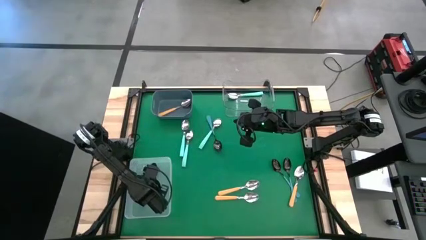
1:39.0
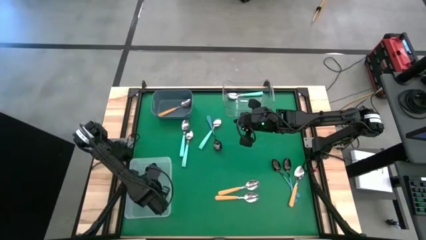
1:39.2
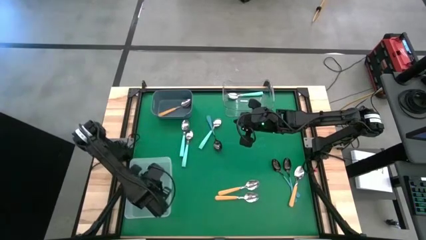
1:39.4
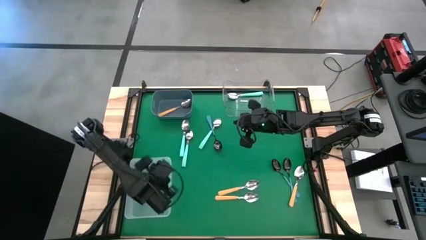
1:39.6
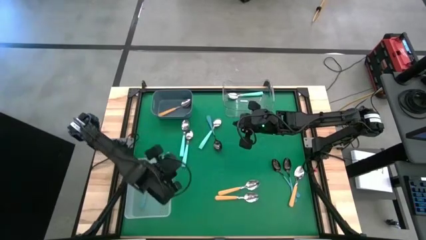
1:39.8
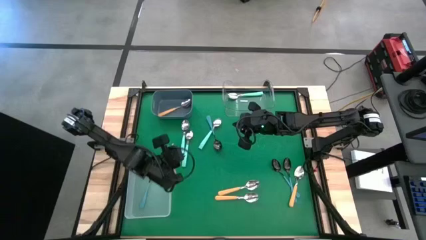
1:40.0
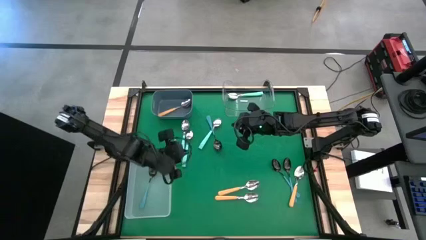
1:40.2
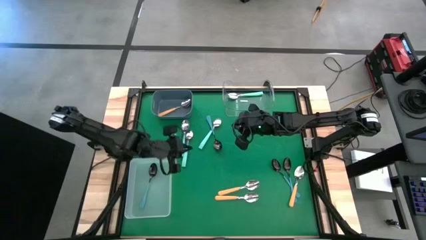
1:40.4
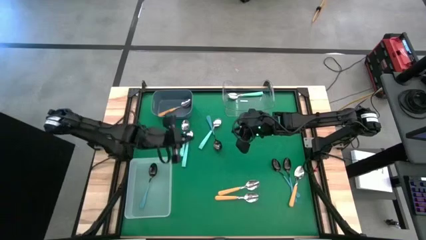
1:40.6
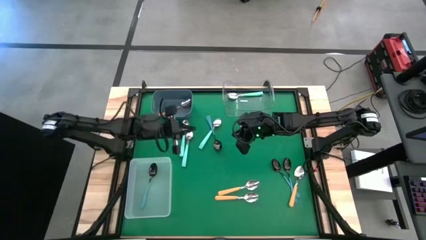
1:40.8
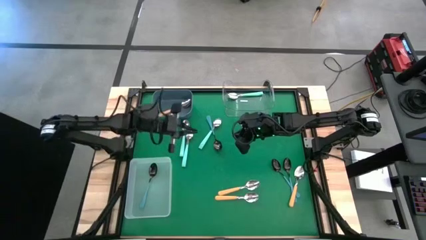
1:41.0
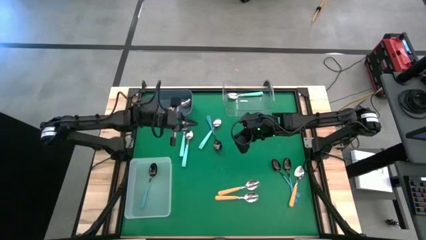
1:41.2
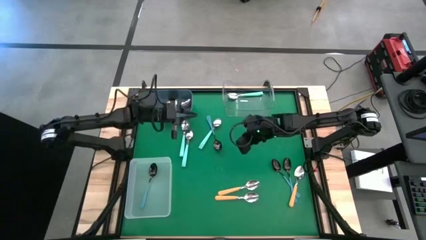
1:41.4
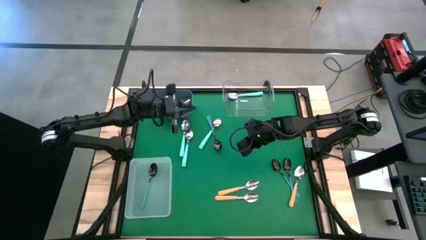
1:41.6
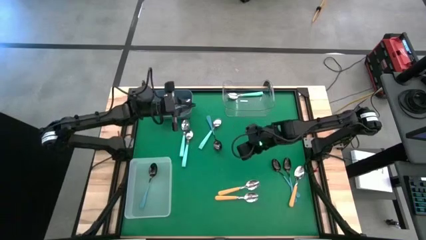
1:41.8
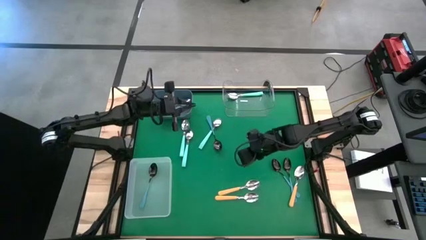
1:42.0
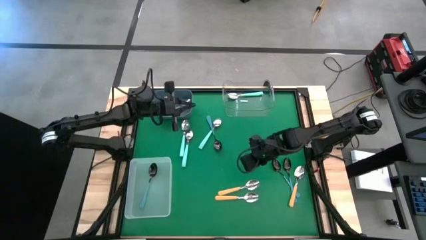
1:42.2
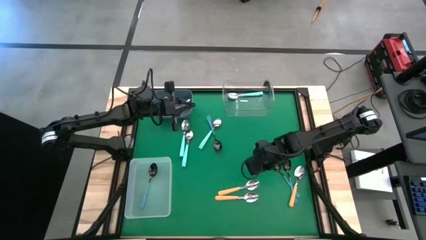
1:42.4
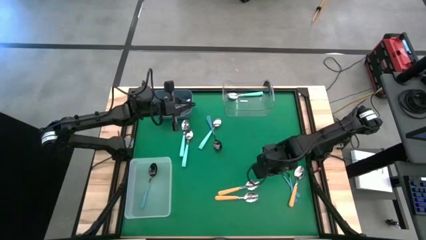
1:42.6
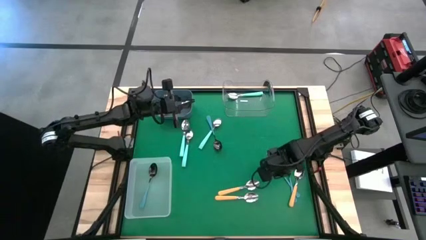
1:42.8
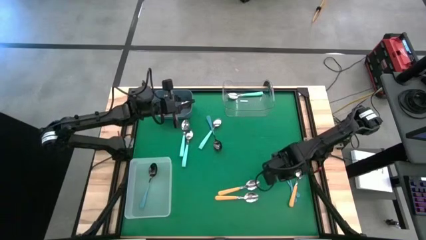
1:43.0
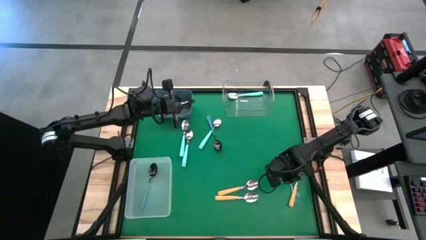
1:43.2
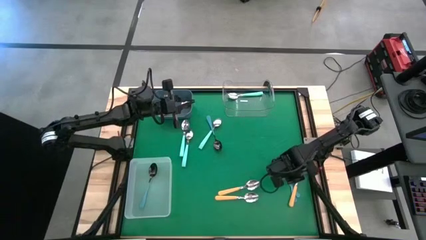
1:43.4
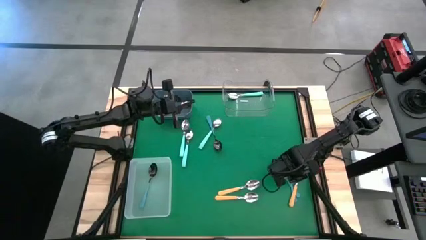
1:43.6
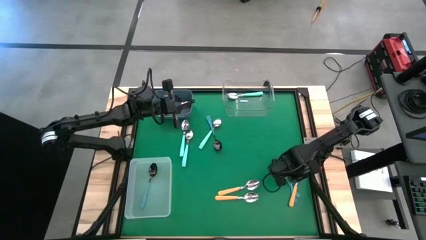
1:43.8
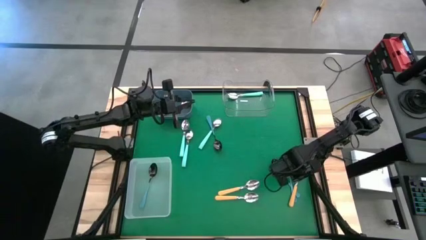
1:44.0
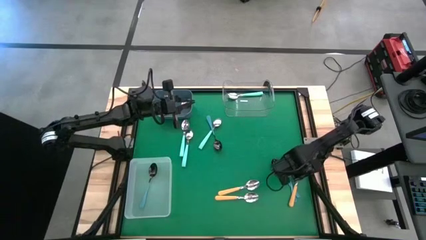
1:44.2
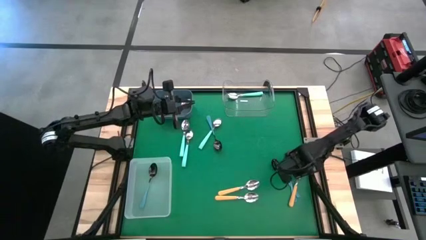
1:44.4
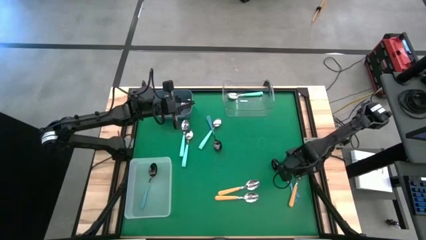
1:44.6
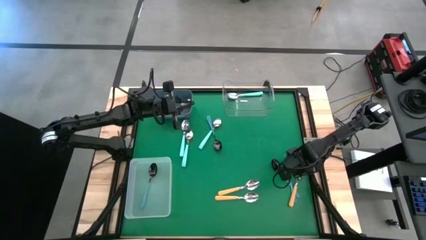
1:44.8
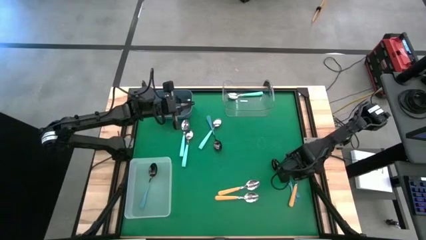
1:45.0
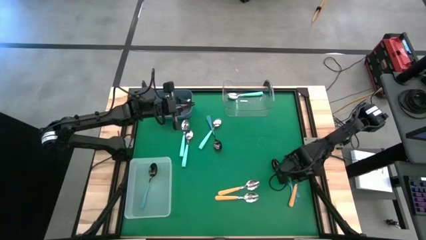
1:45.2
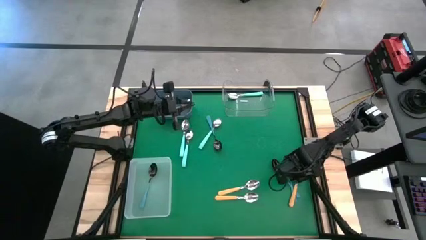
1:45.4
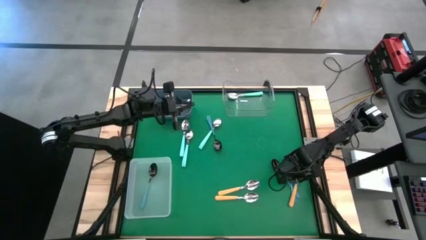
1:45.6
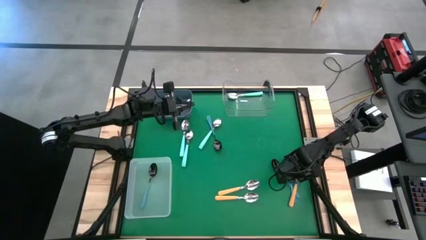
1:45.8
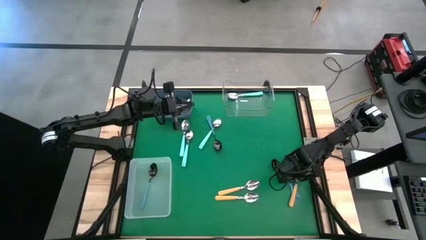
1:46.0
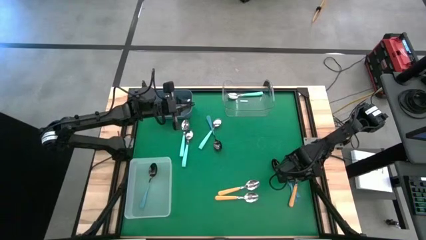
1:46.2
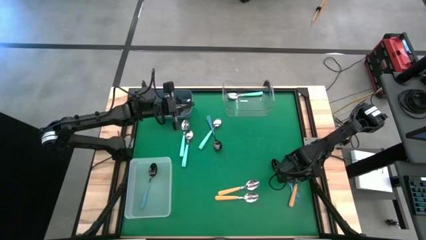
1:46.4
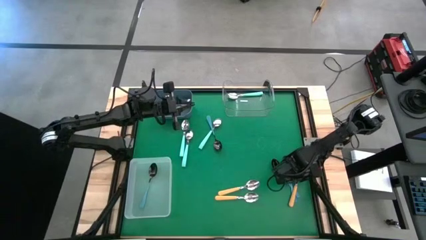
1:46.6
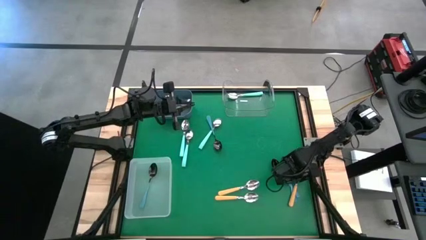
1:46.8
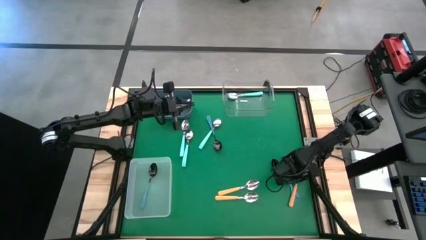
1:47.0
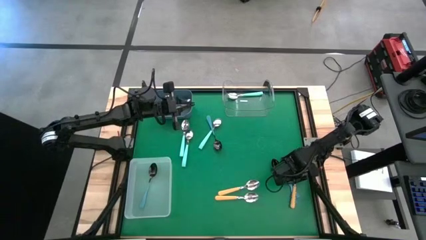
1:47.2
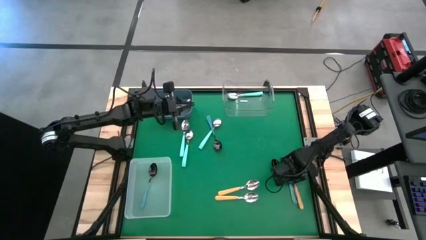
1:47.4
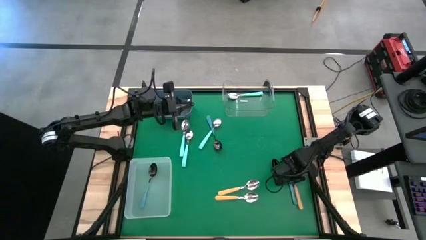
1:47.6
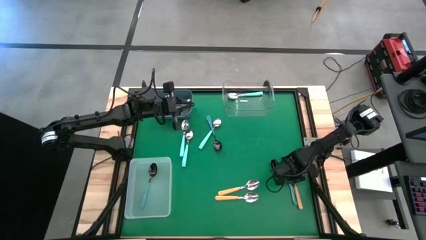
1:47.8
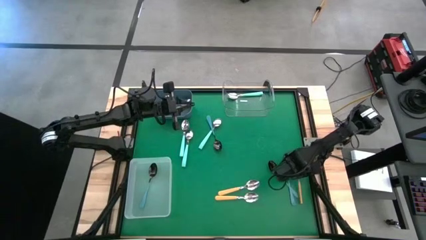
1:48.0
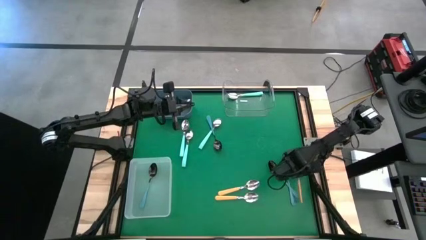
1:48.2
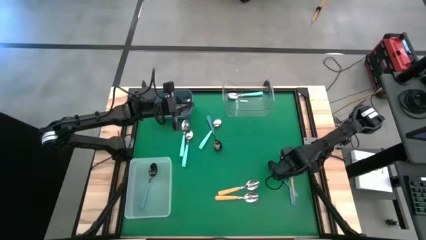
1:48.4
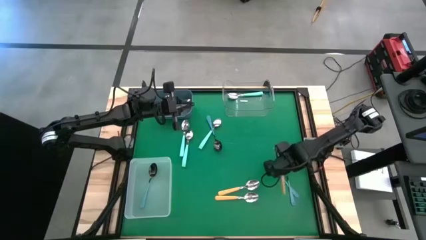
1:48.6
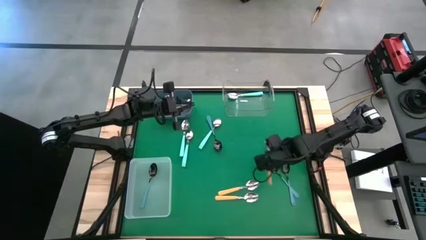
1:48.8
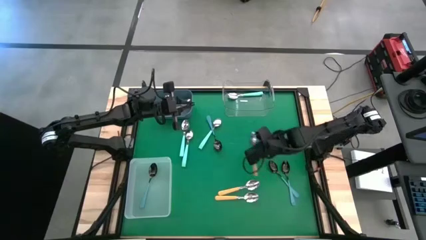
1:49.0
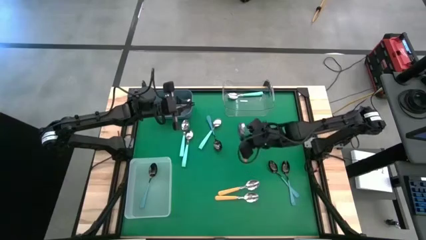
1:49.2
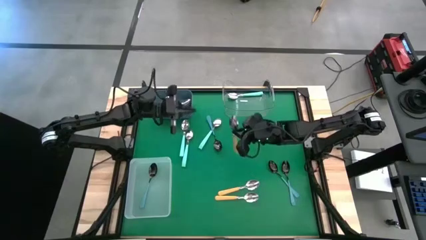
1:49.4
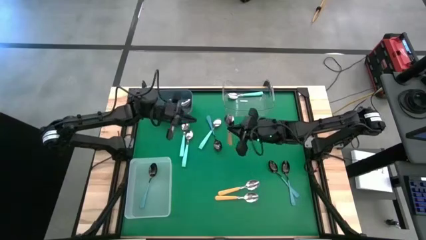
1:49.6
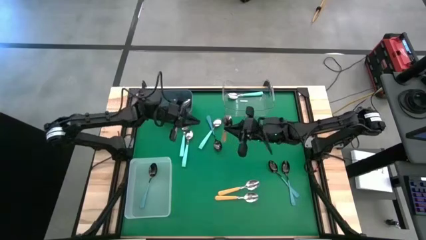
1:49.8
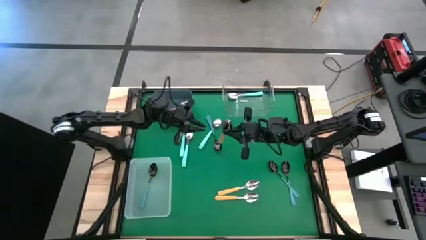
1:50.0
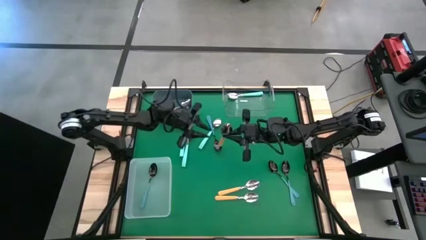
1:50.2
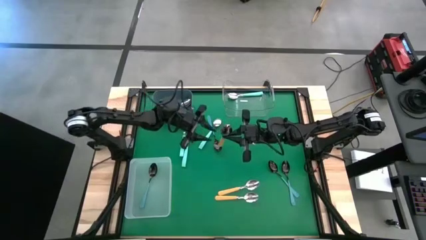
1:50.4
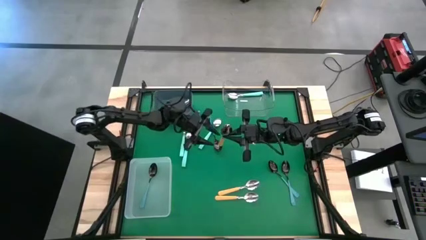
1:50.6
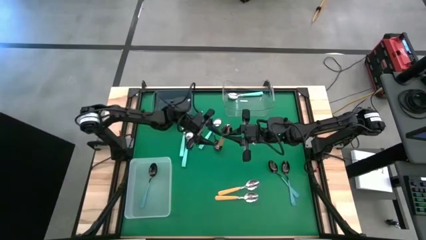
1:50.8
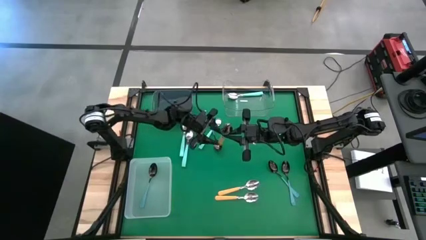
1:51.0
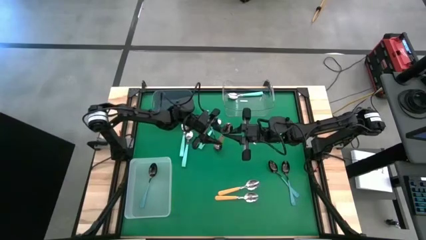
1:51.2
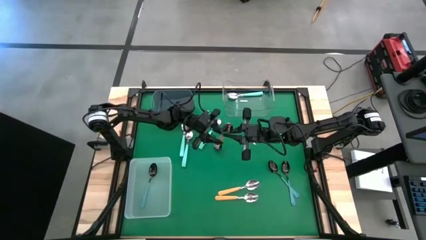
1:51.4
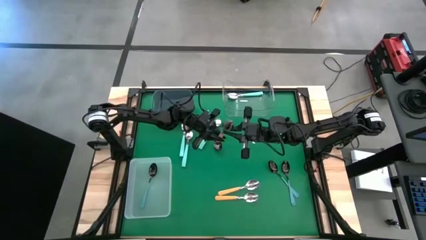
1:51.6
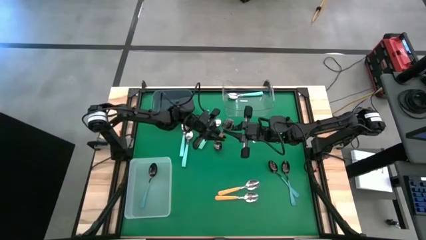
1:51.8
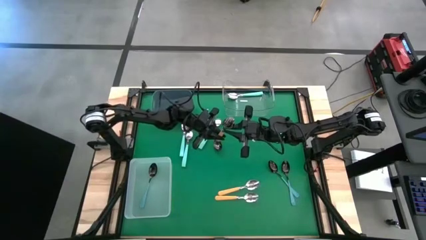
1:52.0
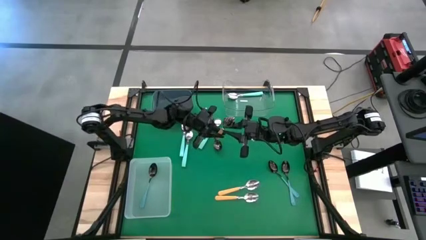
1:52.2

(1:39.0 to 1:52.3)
Task: Sort silverware by color (type)
Put the yellow spoon into the gray bin

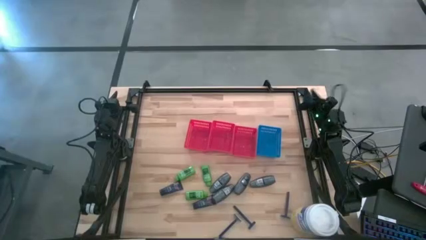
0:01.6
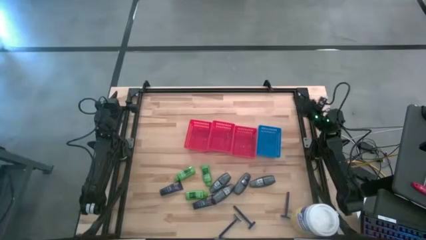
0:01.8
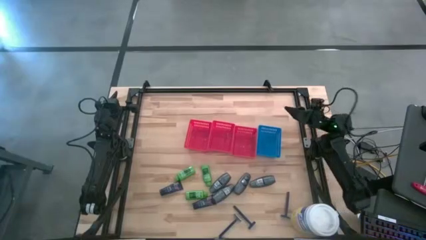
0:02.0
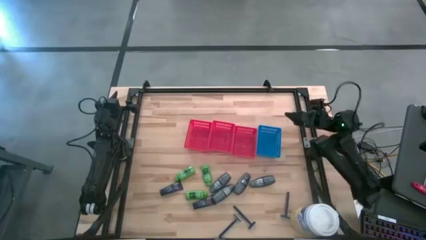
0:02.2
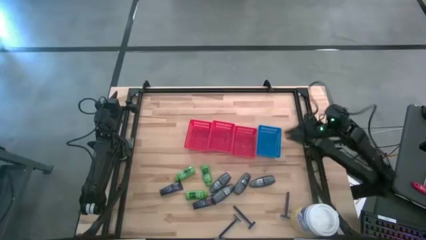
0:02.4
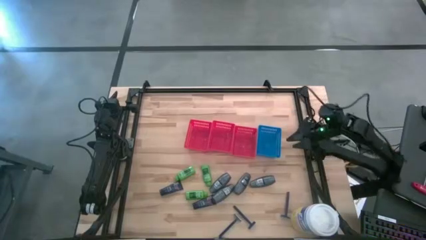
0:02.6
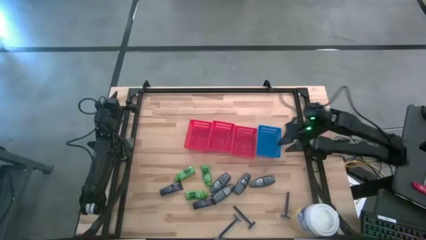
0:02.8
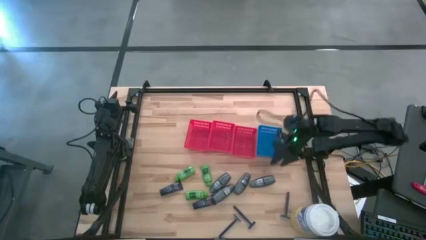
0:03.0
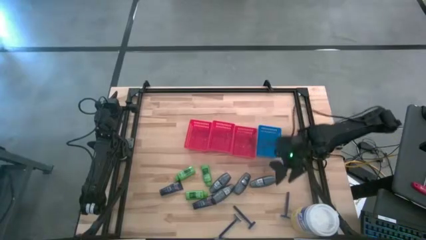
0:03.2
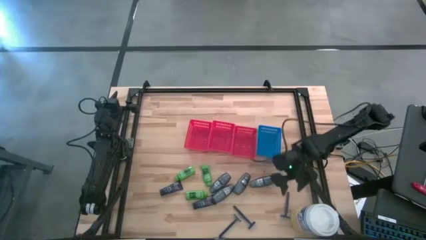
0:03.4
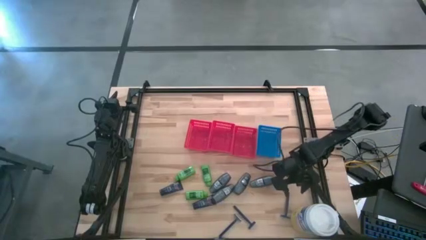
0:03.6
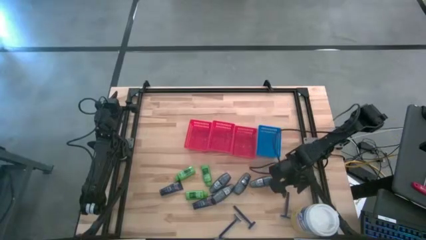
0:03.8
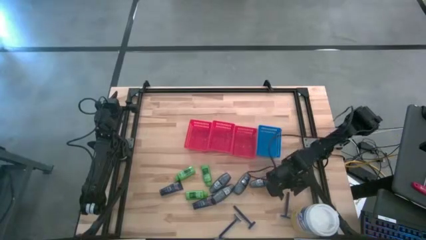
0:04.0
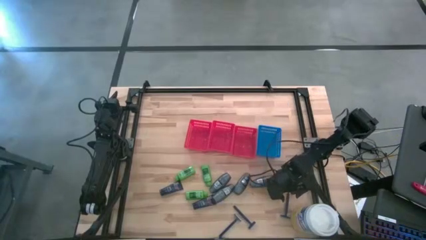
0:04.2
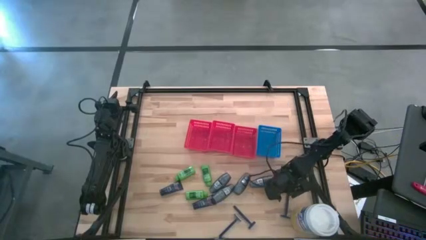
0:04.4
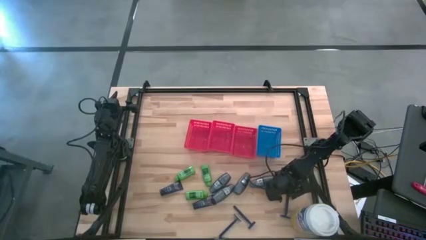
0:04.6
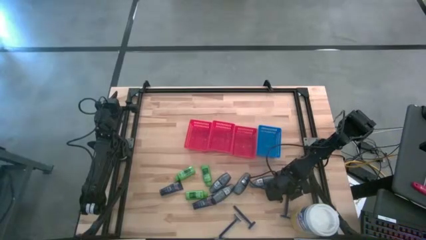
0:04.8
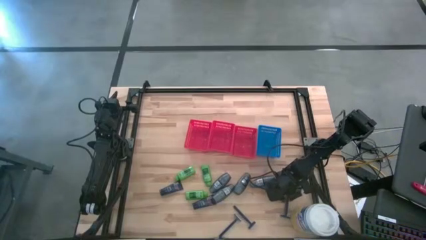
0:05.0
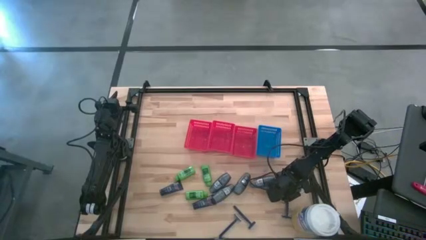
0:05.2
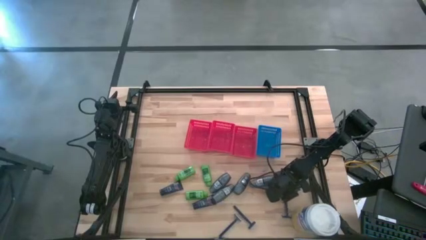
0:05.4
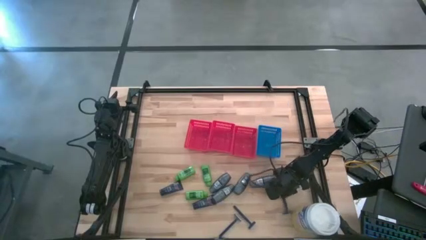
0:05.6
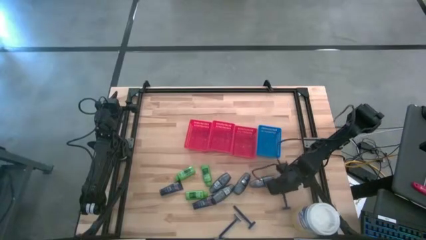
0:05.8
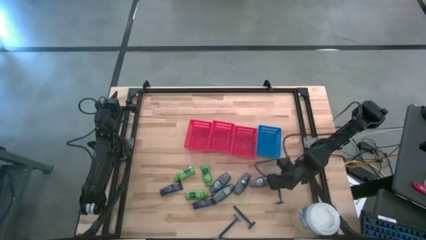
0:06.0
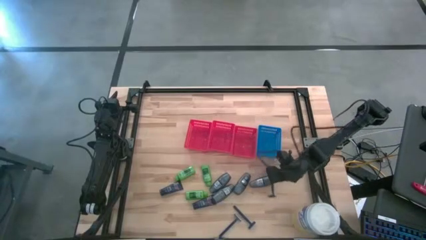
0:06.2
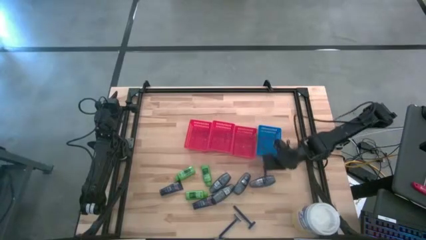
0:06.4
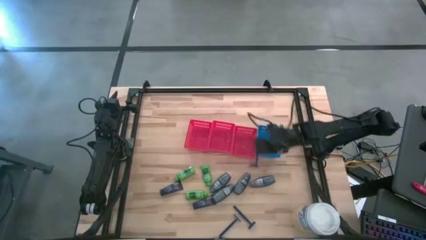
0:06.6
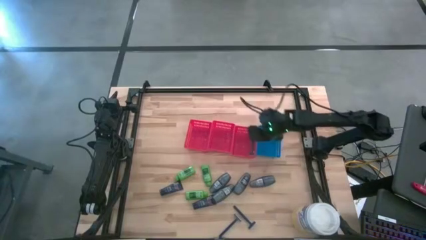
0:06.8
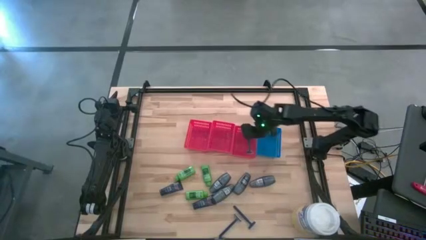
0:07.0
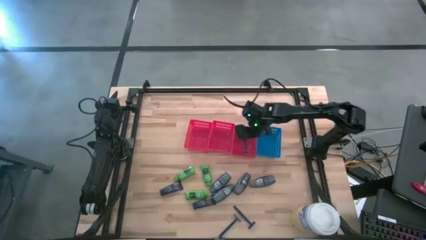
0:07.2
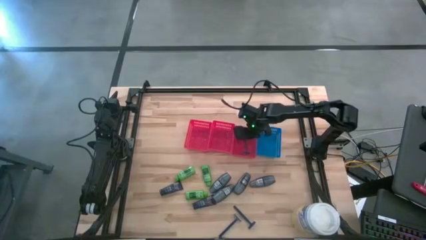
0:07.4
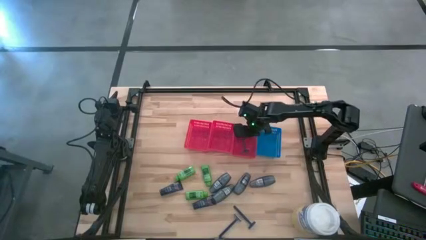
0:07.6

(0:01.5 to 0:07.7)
Task: Pick & Place Travel size toiletries
Put the blue razor in the right red bin
